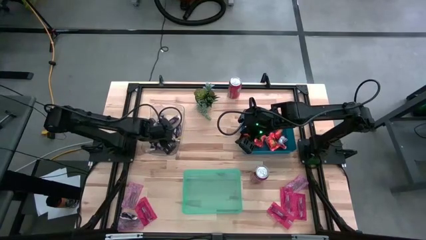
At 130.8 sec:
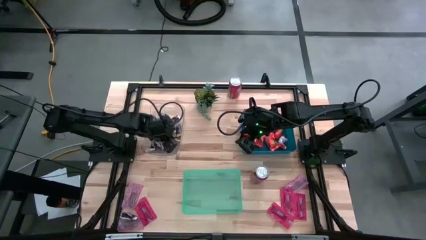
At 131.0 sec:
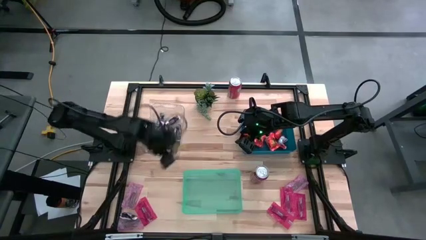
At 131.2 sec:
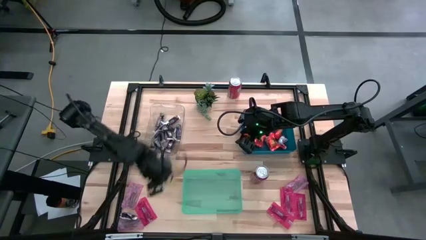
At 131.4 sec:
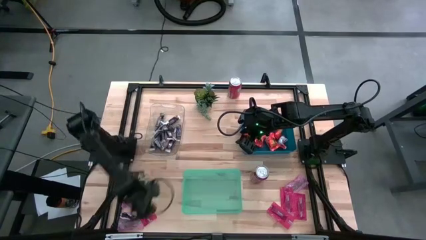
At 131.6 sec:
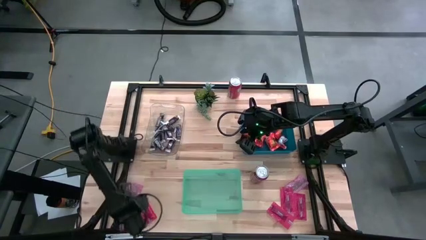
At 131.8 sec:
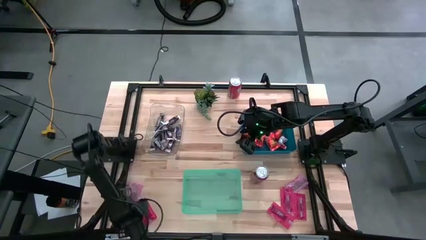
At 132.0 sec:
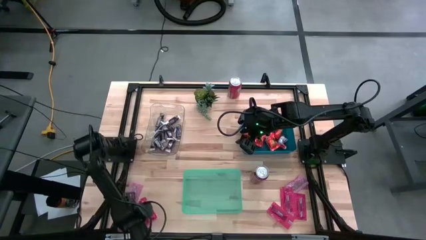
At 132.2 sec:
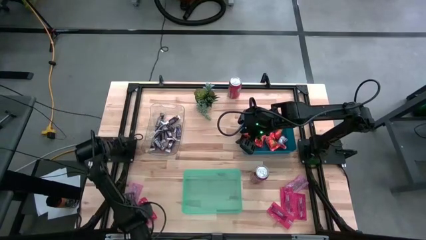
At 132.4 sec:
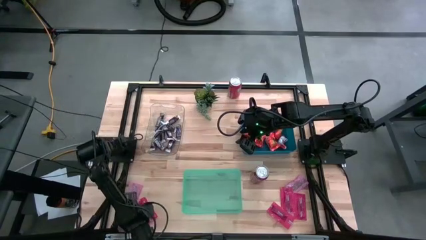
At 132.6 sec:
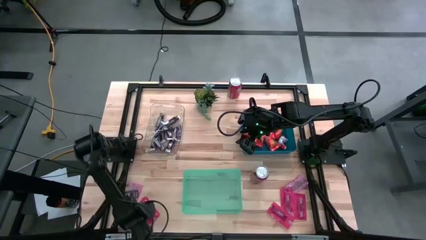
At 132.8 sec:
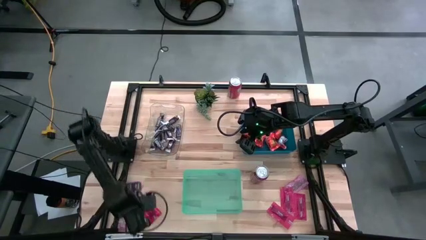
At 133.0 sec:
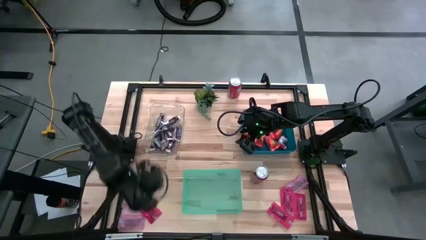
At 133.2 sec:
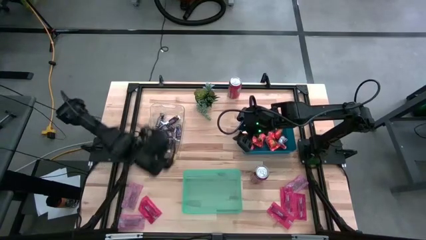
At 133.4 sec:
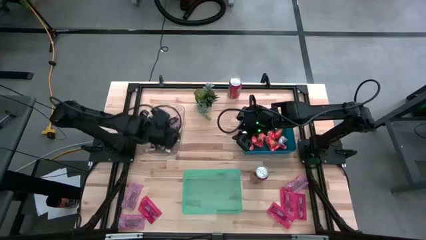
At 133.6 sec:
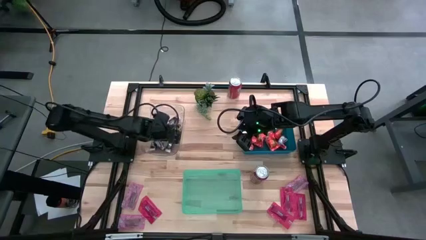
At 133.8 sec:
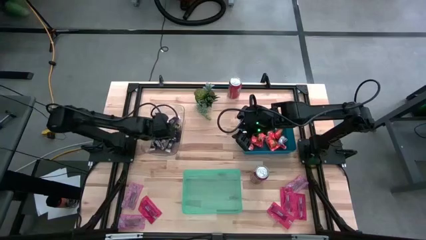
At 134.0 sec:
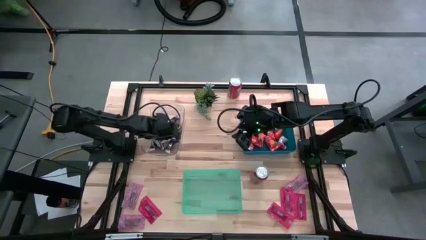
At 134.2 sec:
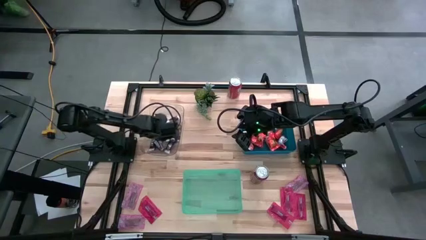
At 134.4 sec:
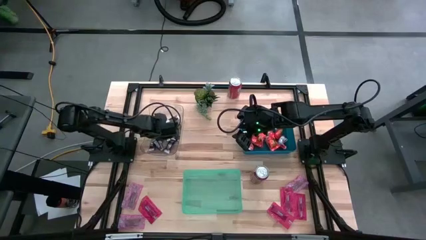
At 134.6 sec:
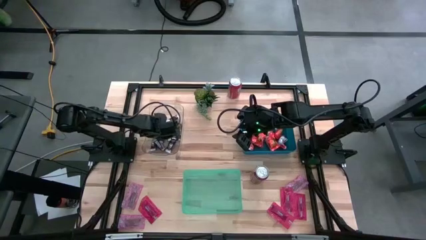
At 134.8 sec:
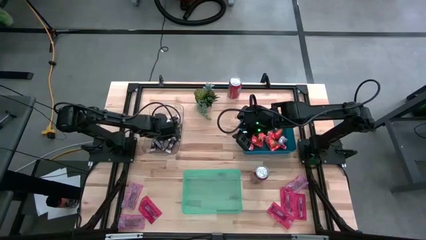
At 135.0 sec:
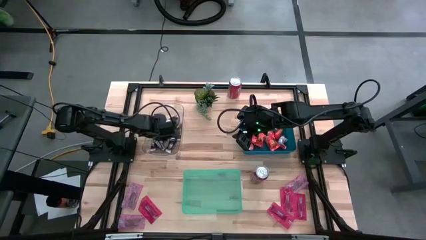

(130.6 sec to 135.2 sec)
Task: Sort candy
Put the brown chocolate bar into the transparent bin

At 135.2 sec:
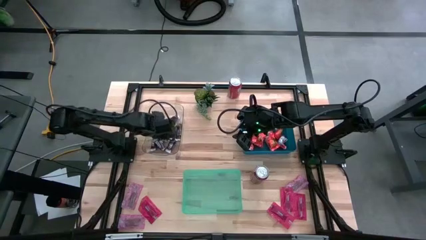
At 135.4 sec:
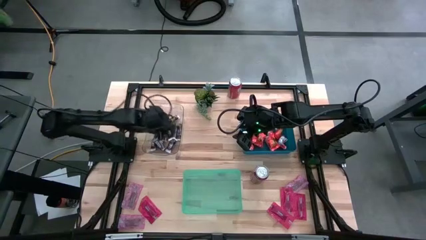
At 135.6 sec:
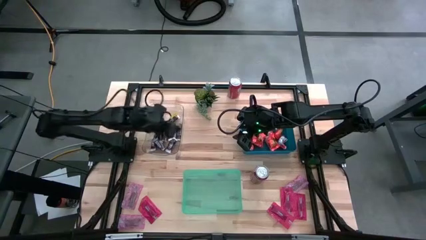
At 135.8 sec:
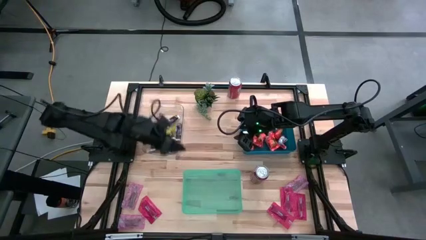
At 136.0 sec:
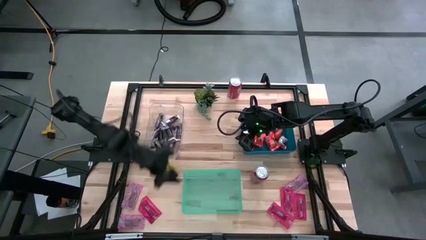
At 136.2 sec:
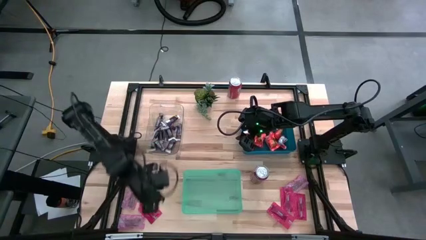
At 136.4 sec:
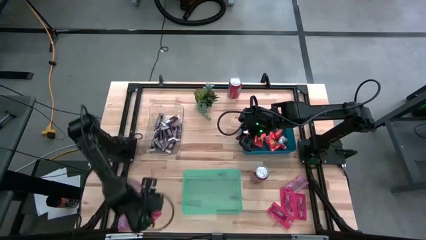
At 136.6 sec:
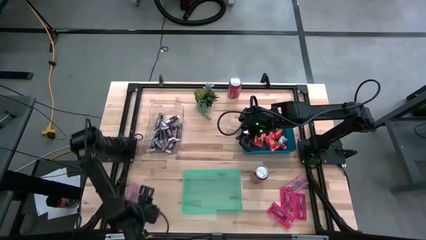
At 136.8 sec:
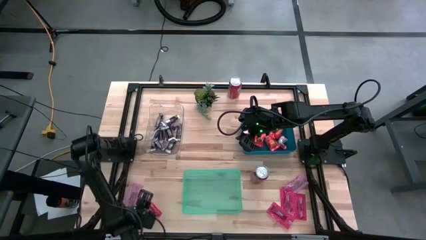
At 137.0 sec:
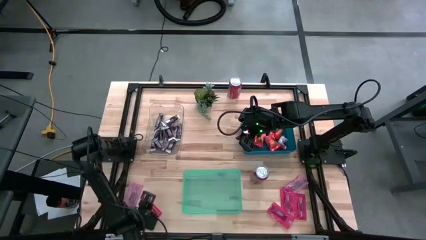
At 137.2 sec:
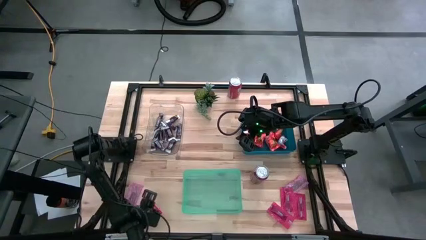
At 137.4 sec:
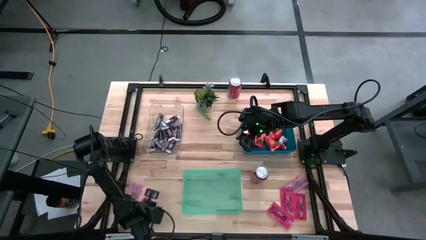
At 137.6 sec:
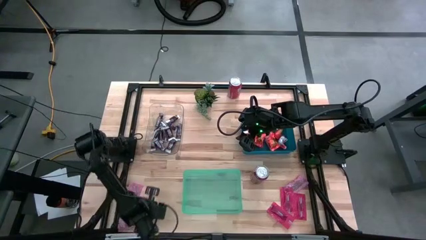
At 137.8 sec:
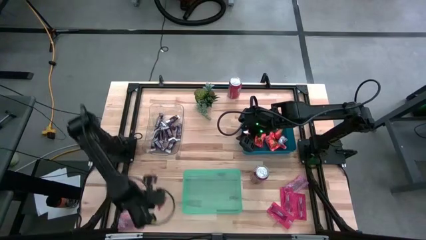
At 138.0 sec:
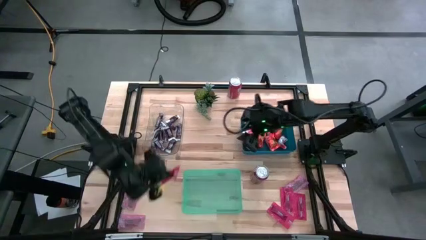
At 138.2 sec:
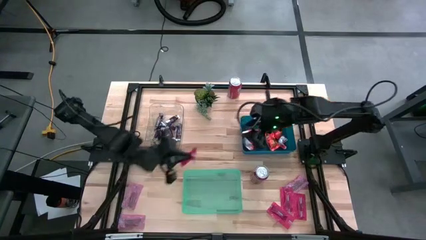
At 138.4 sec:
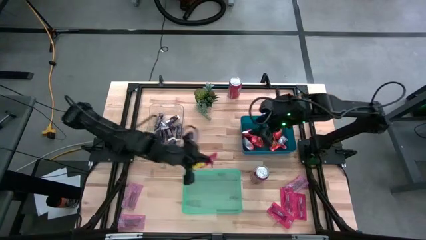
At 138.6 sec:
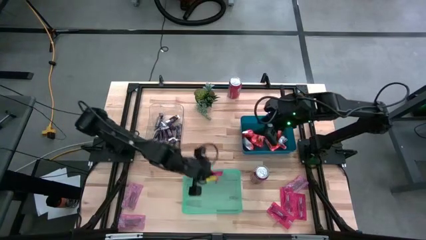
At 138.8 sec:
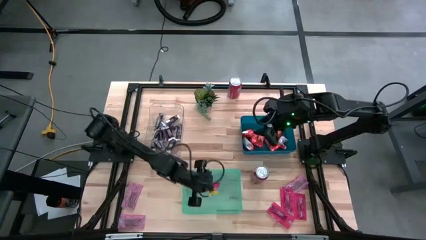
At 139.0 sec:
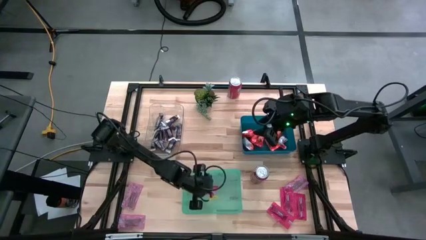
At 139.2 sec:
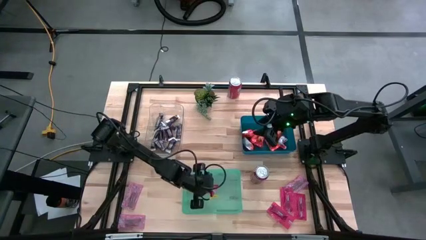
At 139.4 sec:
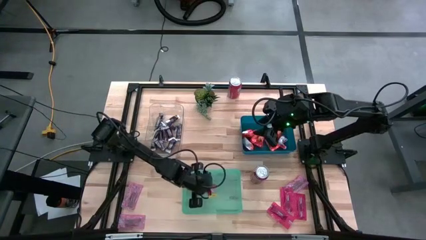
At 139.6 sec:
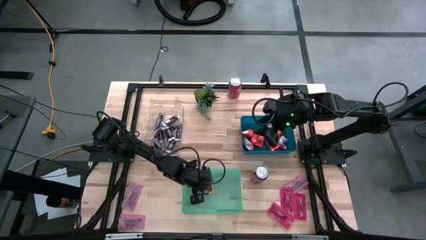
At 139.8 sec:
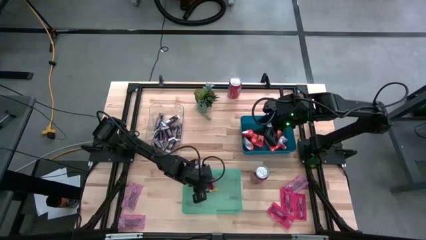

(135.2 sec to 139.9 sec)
Put the red candy into the green bin

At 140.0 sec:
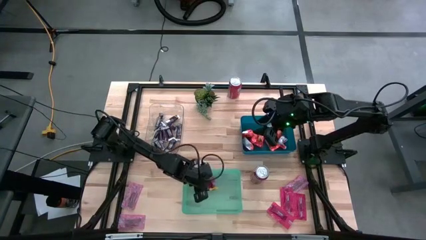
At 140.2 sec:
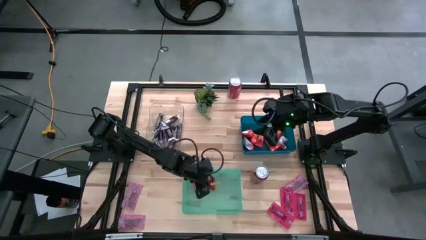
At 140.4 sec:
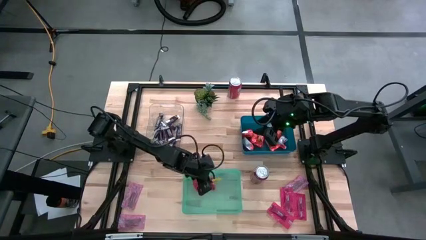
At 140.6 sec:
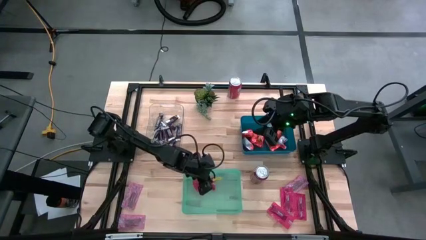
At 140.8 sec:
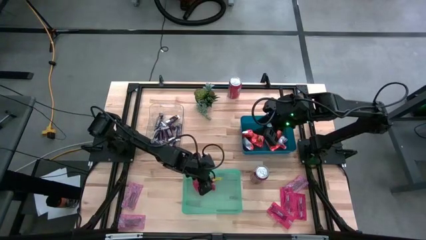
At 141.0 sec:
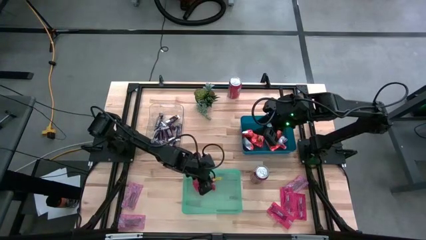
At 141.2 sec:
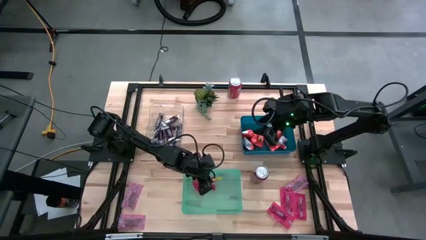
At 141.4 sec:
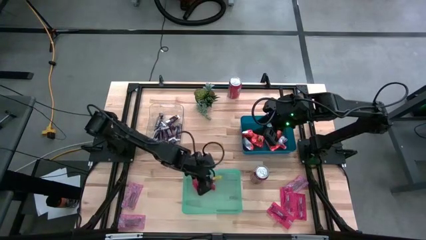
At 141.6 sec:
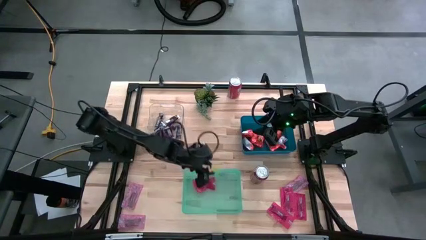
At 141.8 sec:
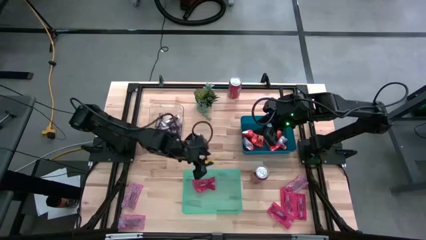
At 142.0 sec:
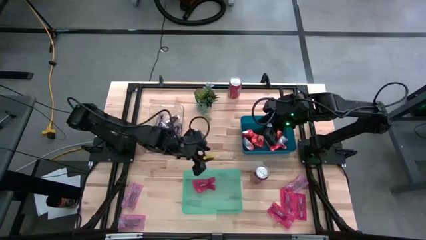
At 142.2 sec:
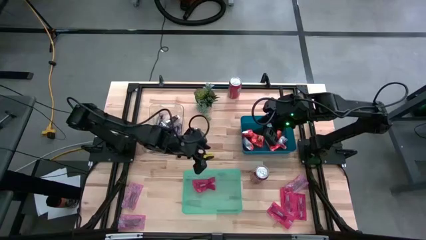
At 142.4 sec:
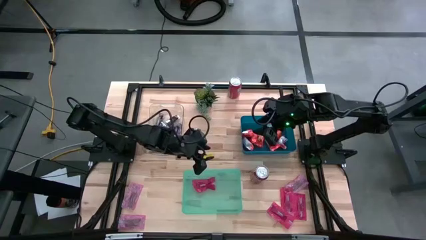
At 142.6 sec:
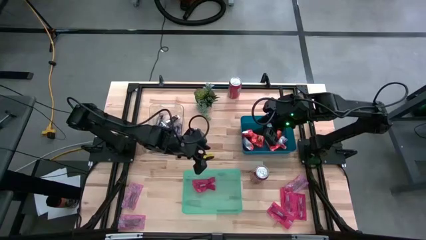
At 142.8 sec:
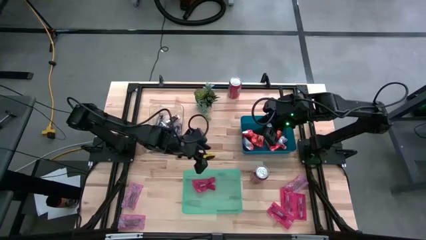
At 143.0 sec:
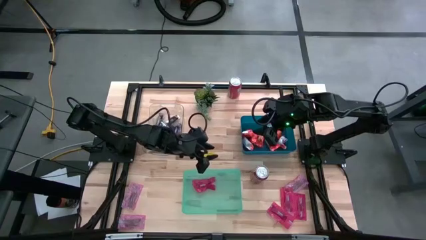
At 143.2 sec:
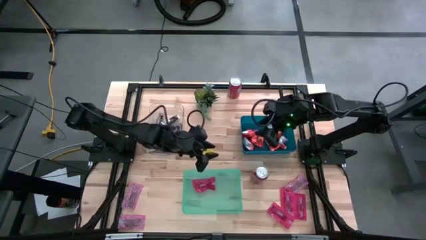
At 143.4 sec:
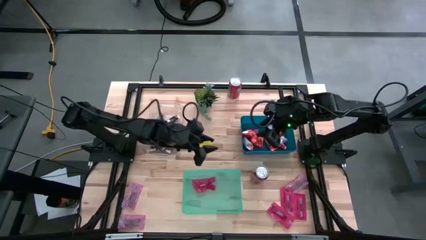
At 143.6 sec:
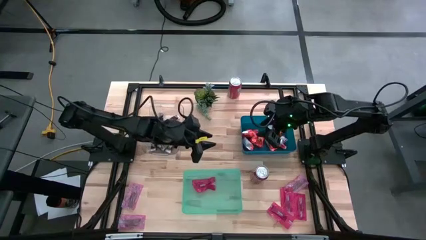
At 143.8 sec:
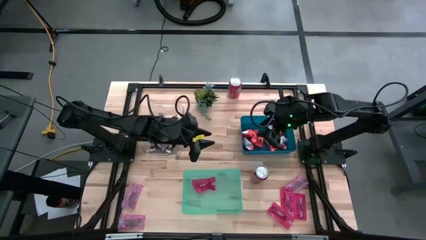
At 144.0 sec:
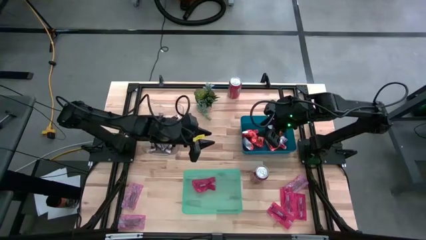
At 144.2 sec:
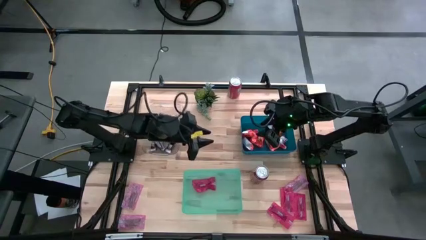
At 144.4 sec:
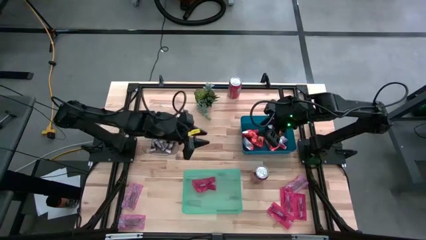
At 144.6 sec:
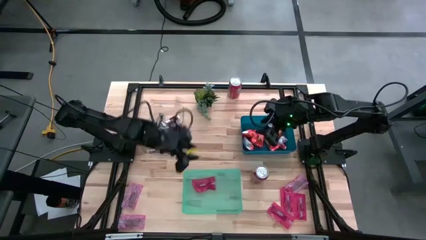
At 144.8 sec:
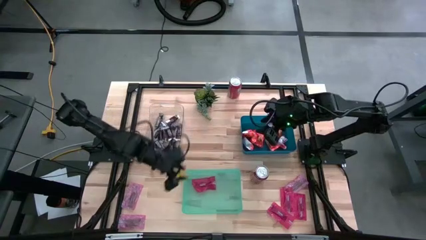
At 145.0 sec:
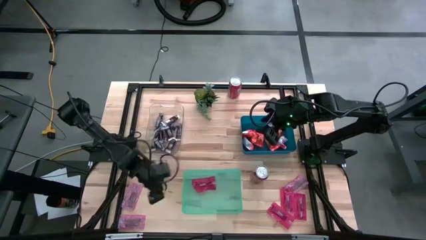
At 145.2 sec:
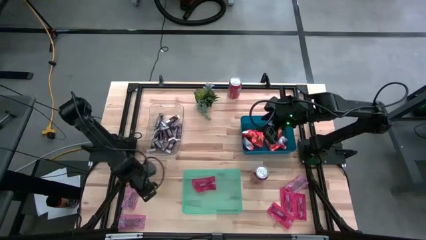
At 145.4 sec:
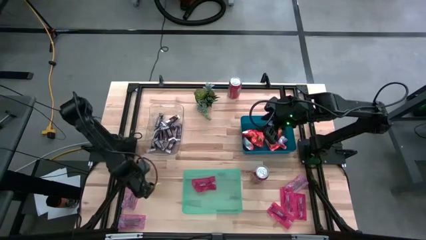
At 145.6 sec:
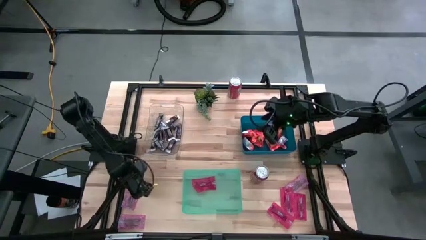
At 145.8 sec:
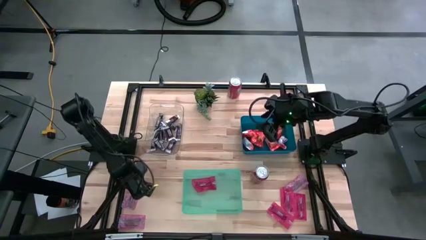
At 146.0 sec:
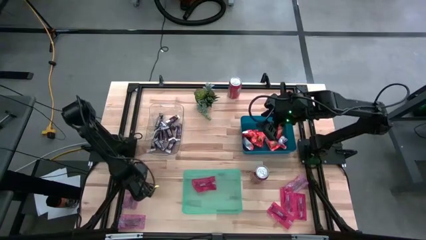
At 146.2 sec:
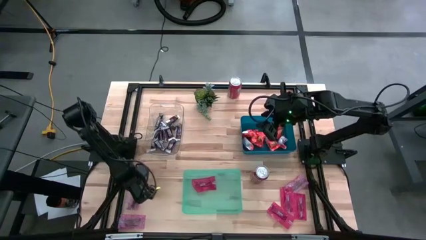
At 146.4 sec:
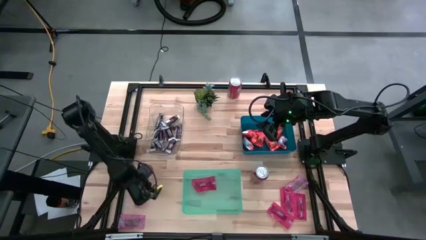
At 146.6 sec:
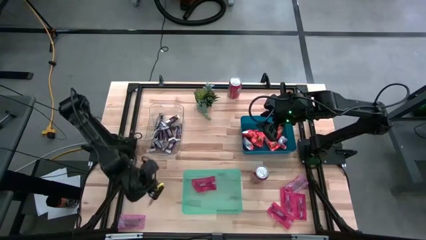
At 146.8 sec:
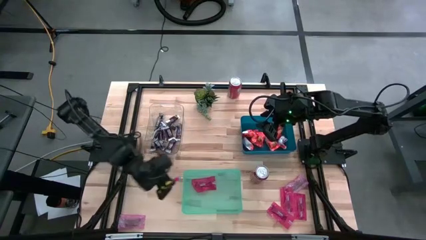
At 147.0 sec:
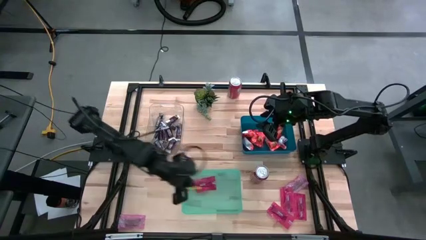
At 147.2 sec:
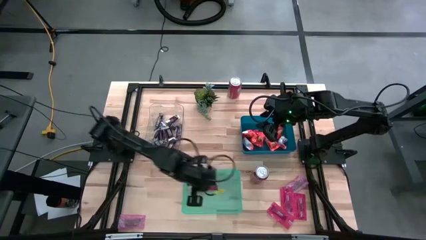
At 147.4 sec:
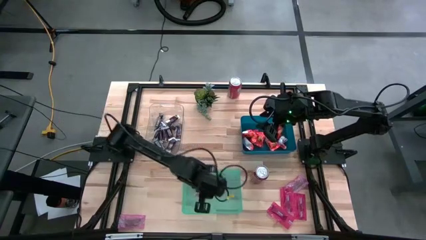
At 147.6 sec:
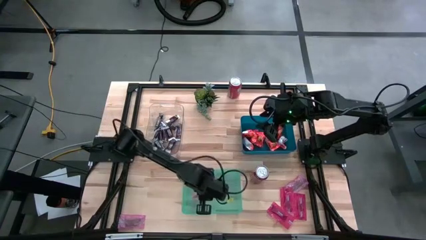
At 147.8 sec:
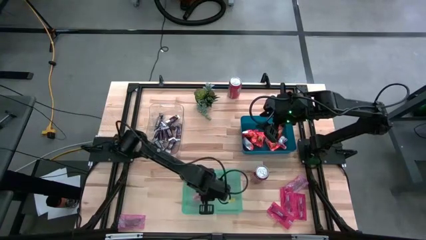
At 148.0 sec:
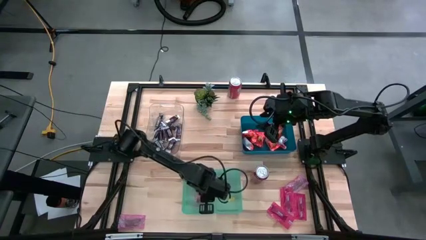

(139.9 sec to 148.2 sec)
Put the red candy into the green bin
